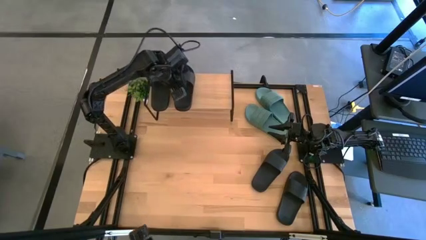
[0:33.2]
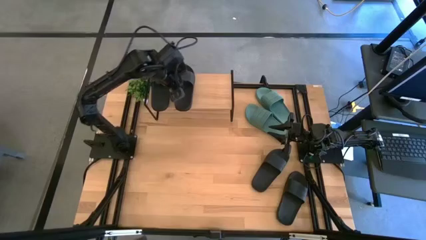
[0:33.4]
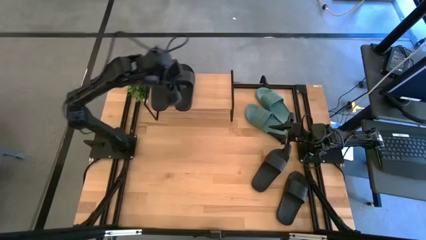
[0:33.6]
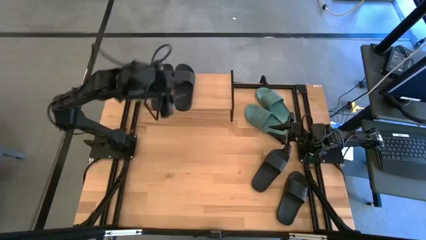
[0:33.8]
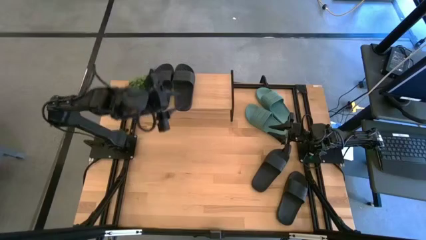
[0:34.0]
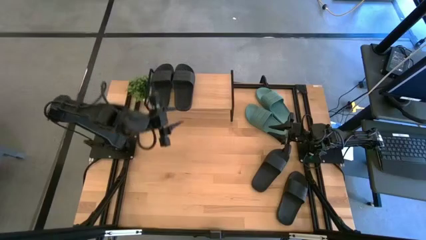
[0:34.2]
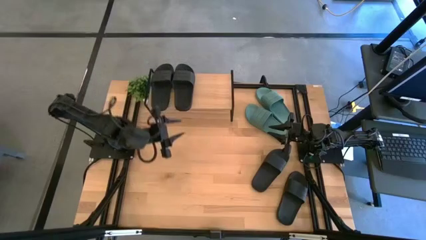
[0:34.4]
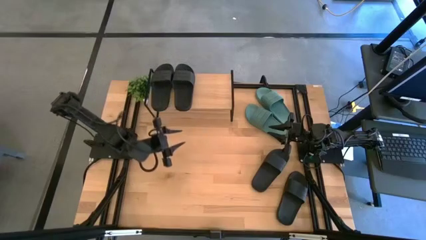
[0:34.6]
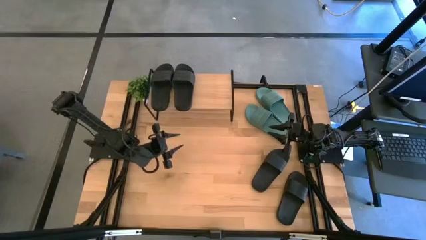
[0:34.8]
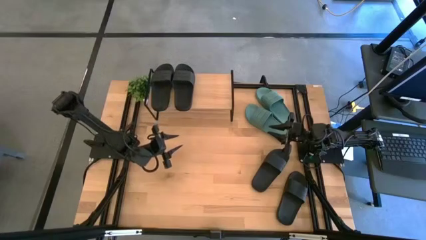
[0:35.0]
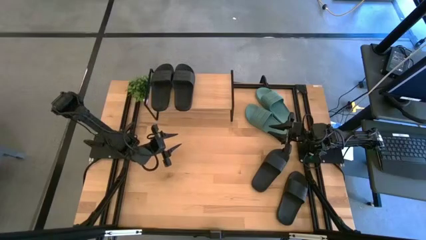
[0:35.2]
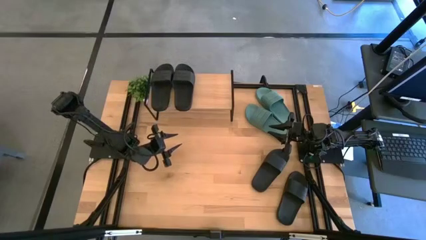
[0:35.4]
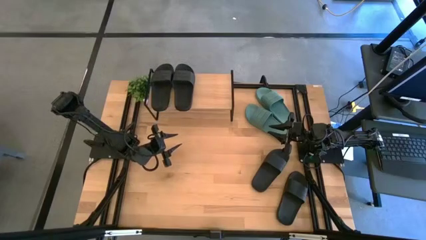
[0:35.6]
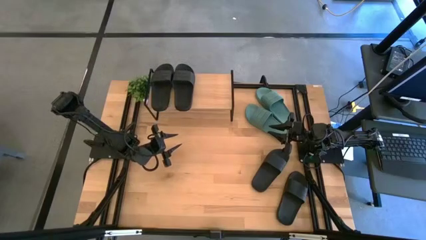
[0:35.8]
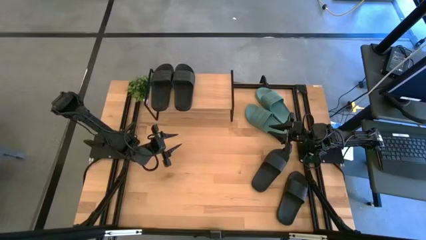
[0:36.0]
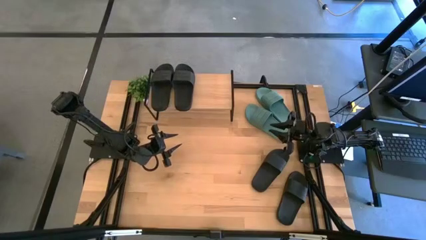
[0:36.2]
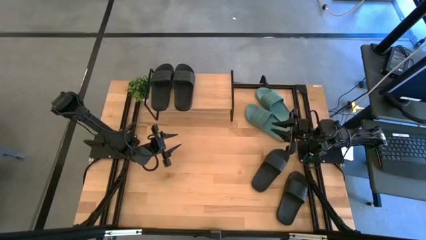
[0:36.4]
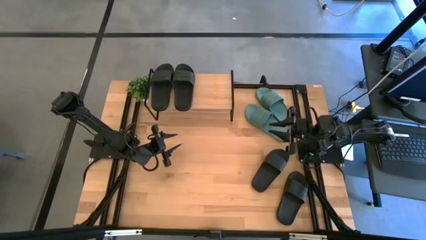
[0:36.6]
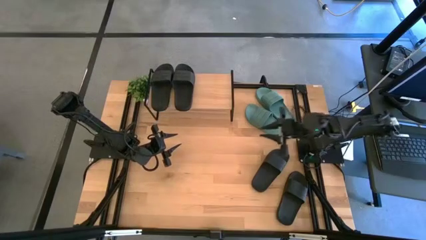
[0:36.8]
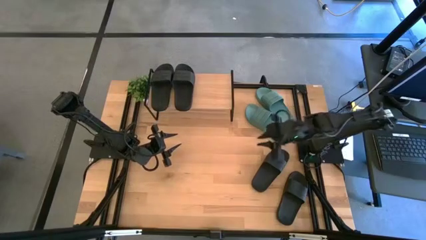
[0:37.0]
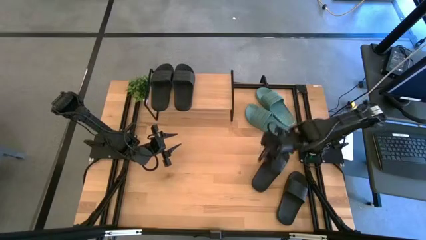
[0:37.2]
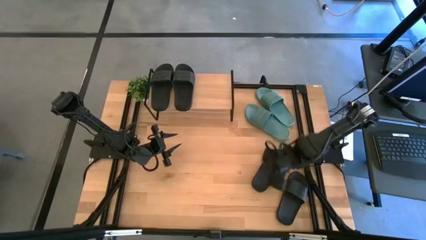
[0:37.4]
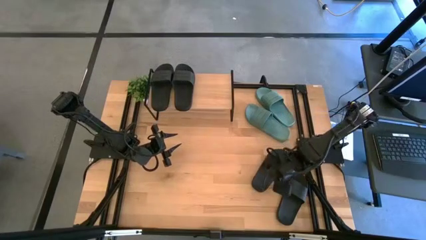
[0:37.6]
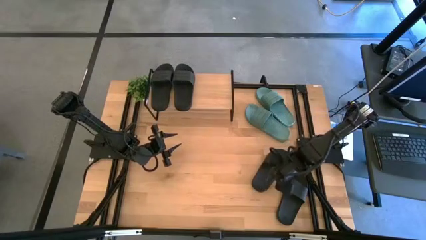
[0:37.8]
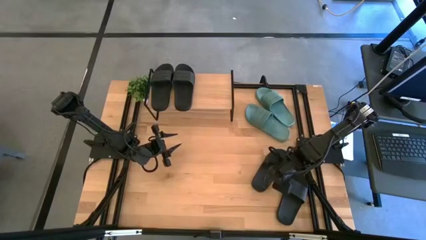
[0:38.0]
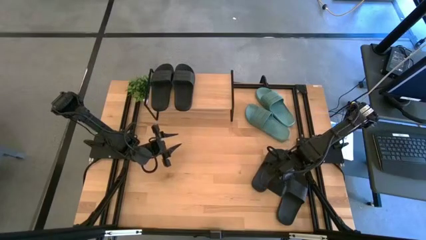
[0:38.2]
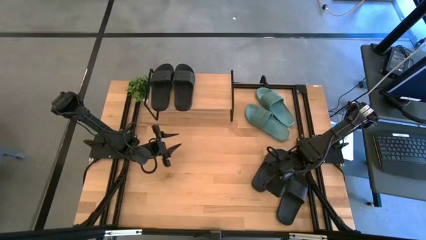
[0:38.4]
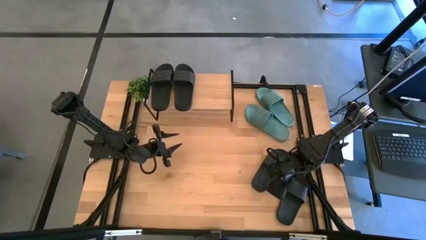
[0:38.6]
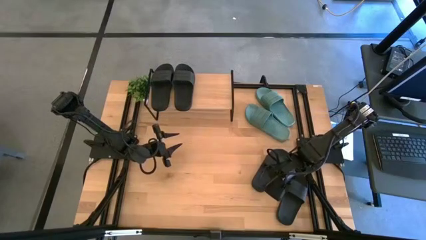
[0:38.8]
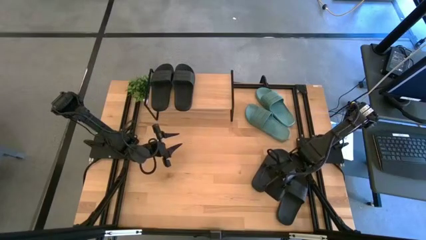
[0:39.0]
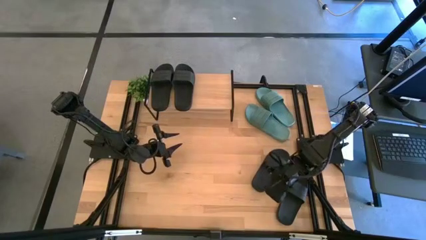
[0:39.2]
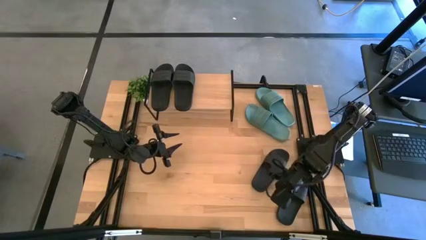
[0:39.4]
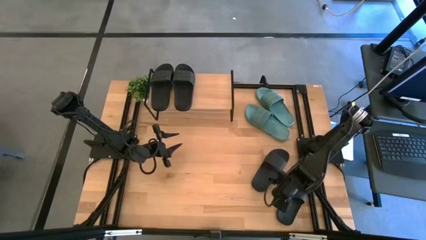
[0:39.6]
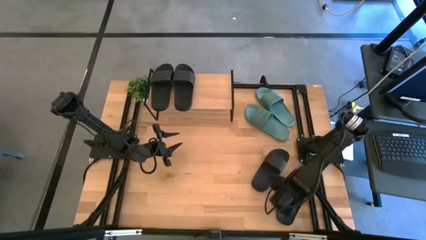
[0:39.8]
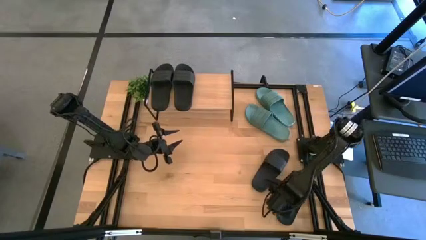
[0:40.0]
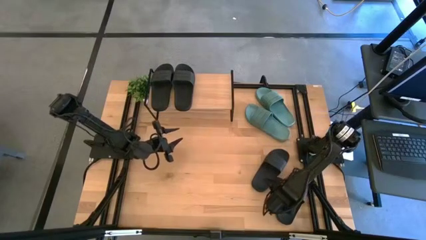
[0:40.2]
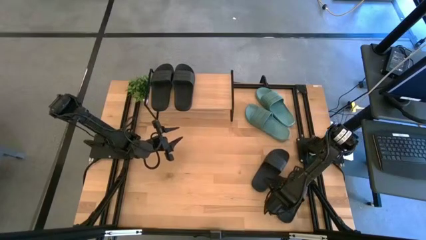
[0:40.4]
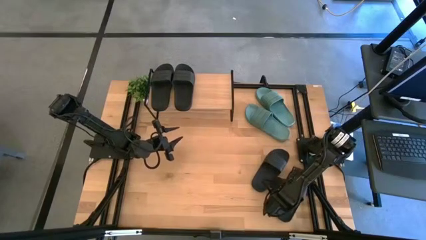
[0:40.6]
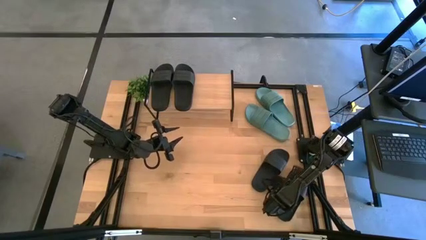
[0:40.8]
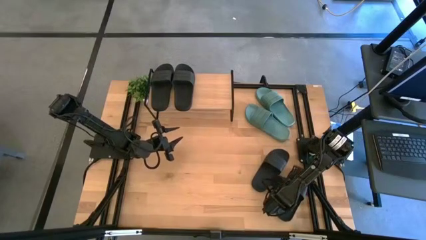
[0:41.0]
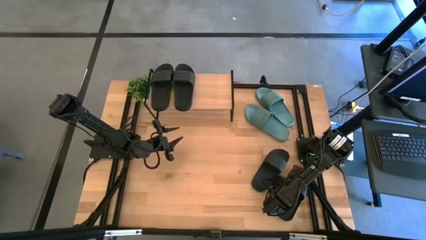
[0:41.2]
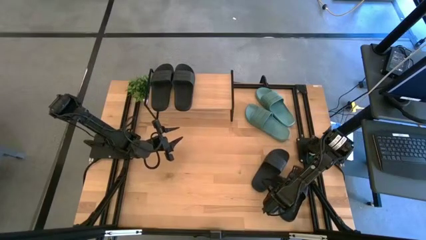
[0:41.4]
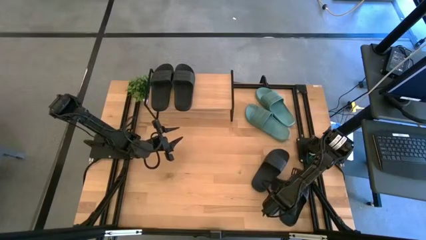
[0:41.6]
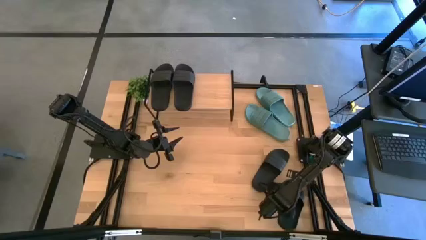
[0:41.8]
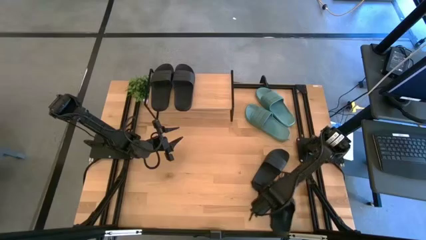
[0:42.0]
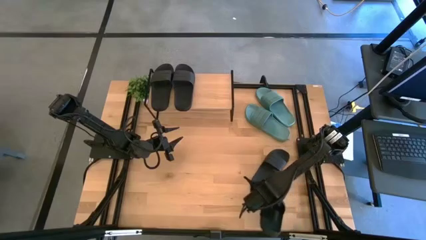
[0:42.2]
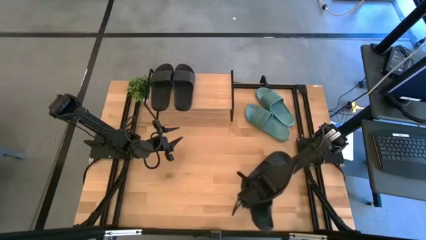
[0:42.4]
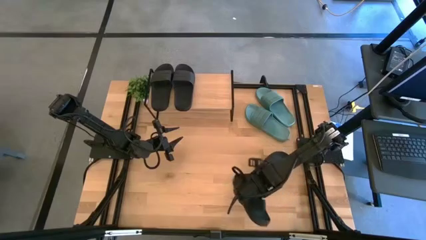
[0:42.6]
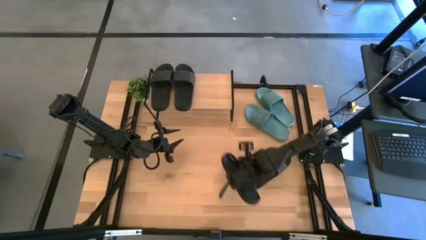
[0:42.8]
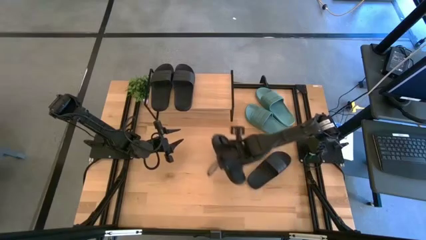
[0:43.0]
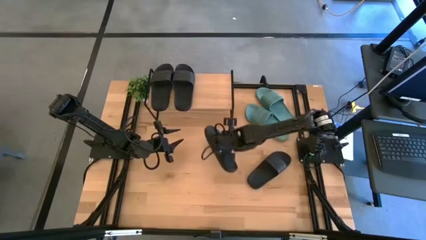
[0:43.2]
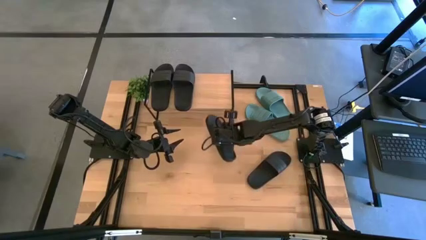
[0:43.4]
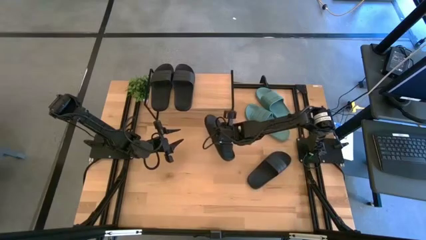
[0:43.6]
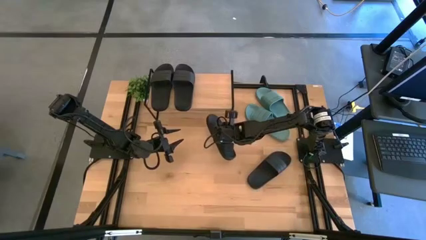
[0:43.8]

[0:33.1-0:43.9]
Task: Pick and place slides into the shelf
Put the black slipper under the shelf
